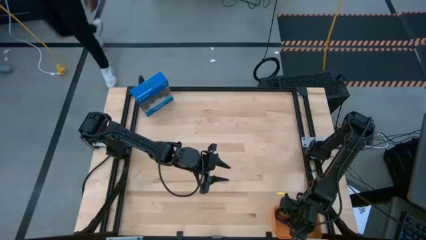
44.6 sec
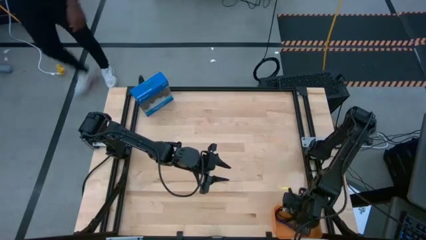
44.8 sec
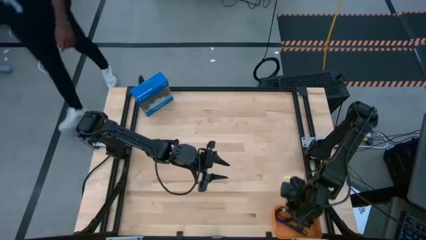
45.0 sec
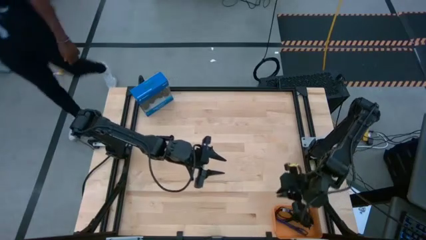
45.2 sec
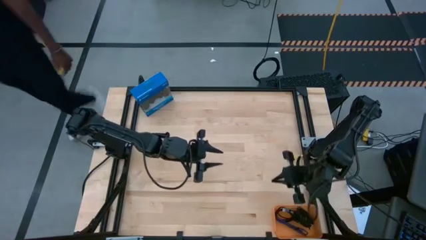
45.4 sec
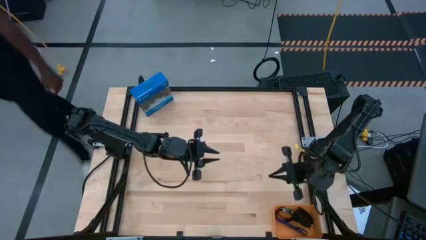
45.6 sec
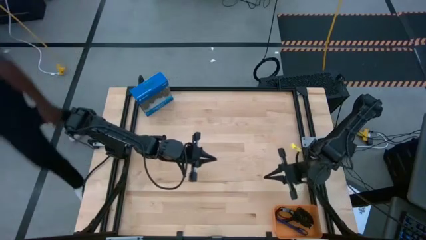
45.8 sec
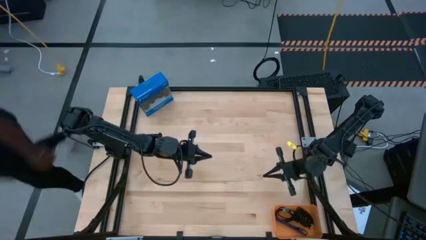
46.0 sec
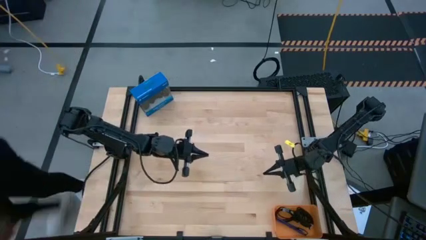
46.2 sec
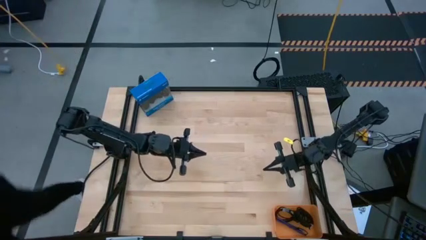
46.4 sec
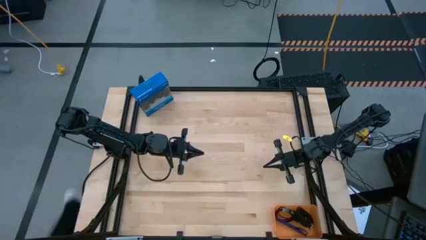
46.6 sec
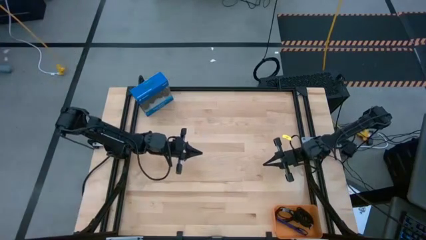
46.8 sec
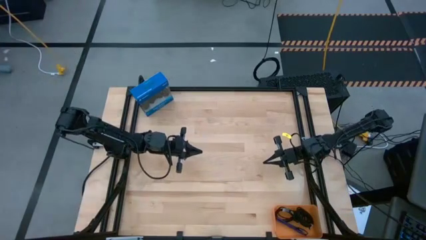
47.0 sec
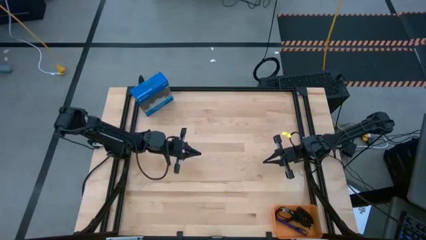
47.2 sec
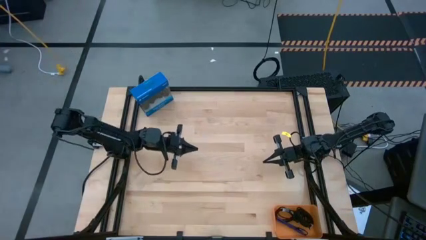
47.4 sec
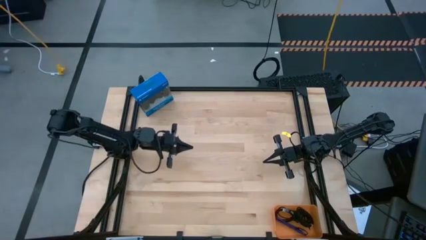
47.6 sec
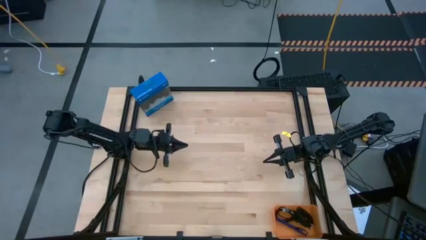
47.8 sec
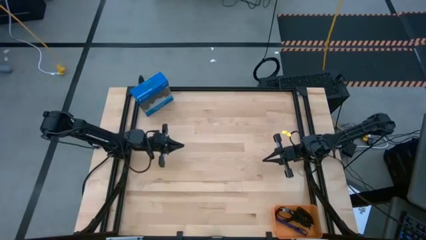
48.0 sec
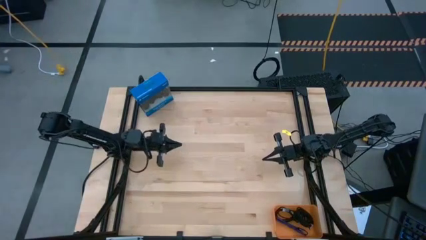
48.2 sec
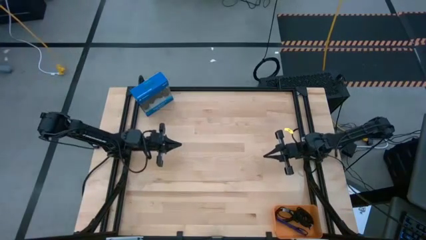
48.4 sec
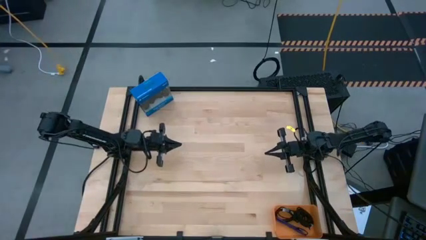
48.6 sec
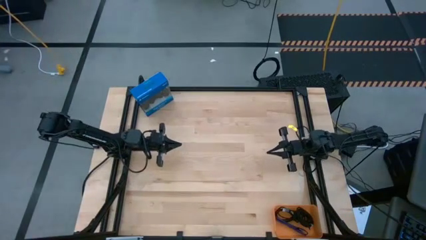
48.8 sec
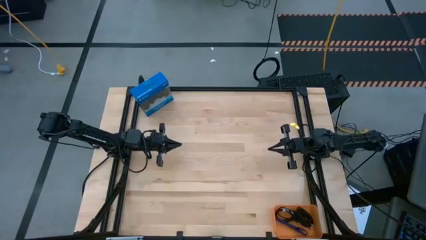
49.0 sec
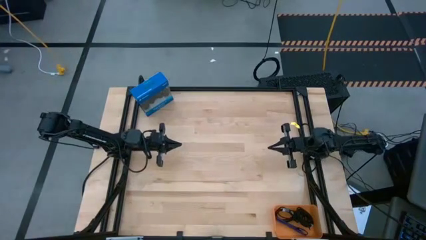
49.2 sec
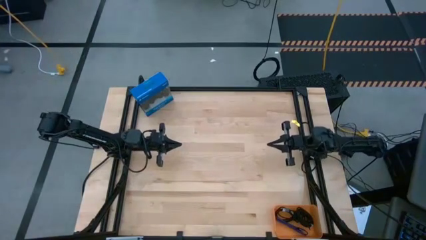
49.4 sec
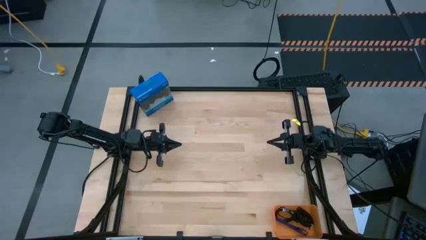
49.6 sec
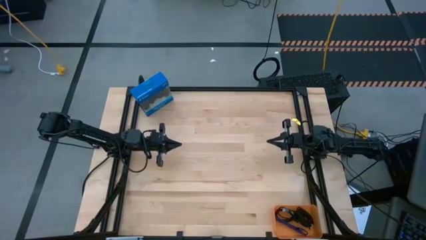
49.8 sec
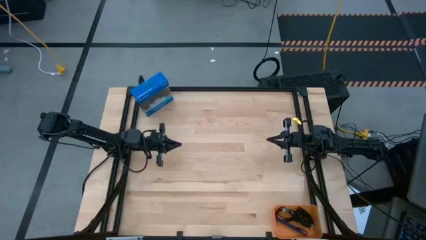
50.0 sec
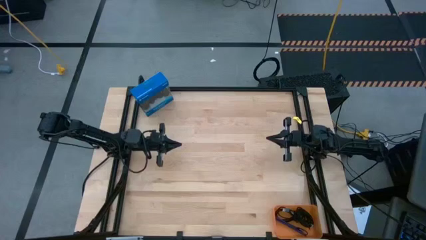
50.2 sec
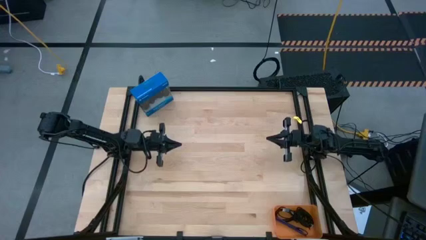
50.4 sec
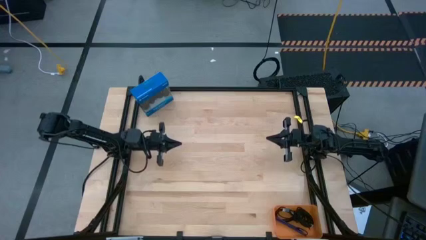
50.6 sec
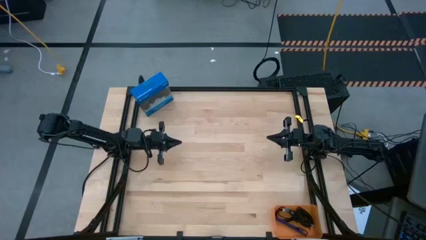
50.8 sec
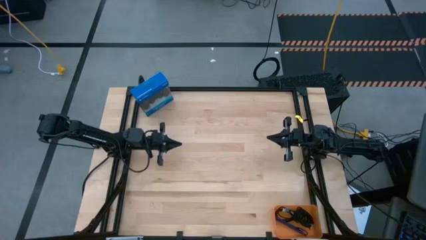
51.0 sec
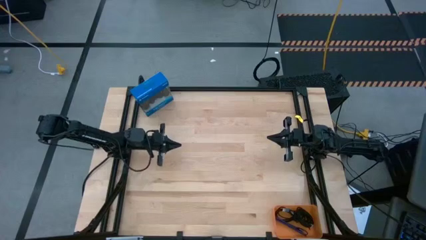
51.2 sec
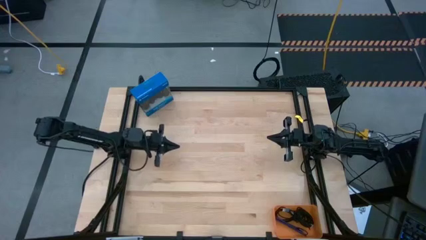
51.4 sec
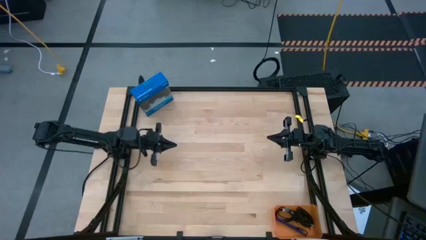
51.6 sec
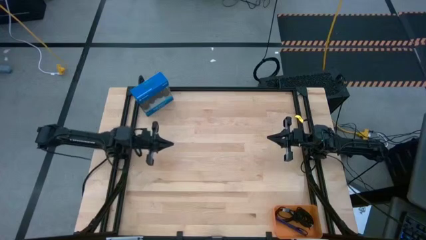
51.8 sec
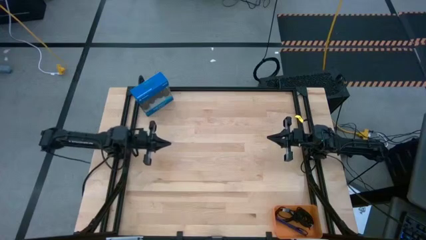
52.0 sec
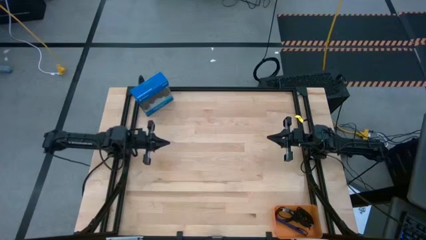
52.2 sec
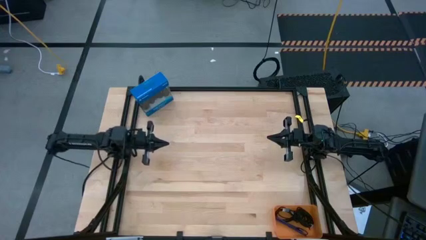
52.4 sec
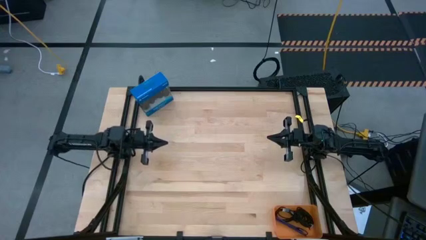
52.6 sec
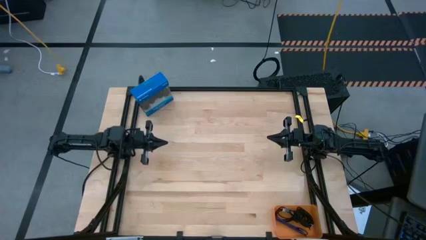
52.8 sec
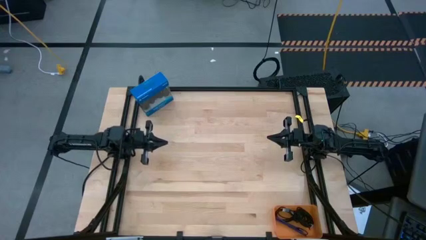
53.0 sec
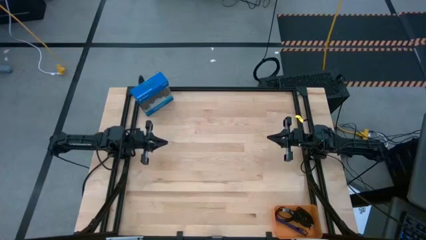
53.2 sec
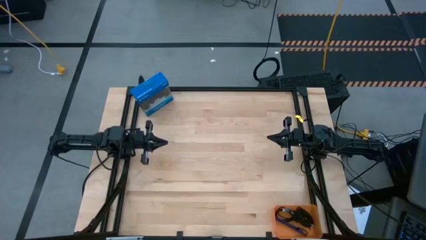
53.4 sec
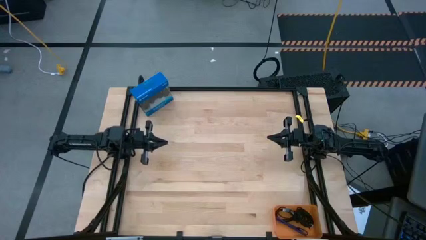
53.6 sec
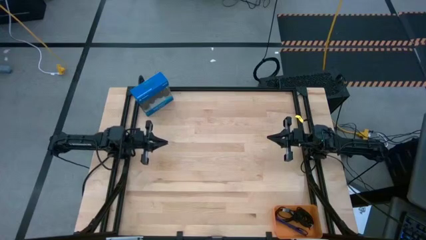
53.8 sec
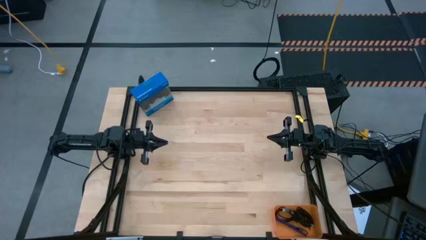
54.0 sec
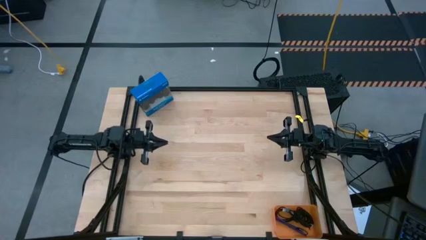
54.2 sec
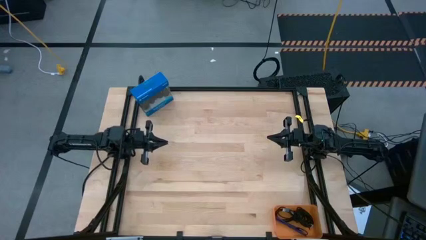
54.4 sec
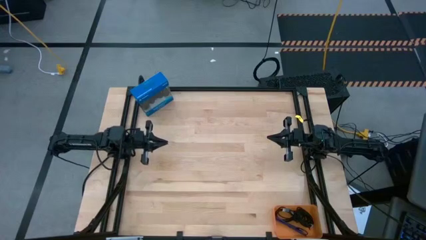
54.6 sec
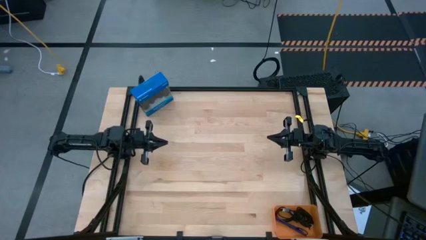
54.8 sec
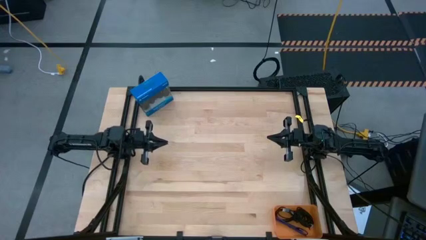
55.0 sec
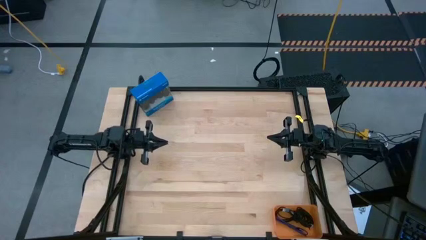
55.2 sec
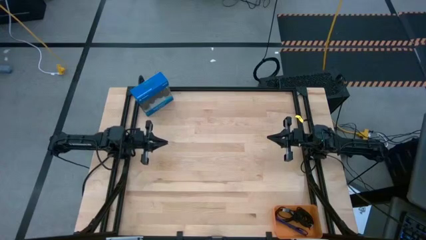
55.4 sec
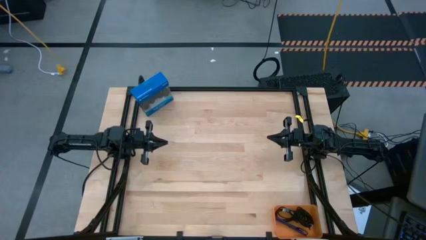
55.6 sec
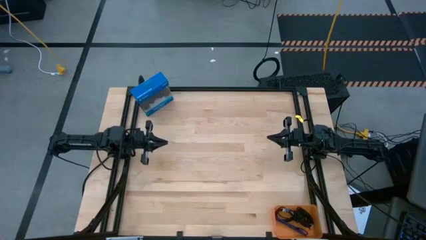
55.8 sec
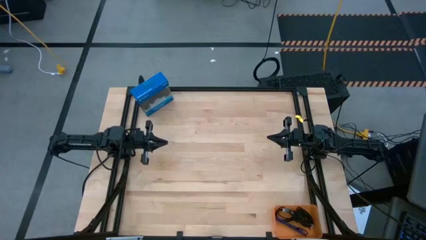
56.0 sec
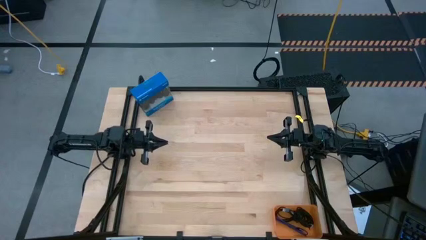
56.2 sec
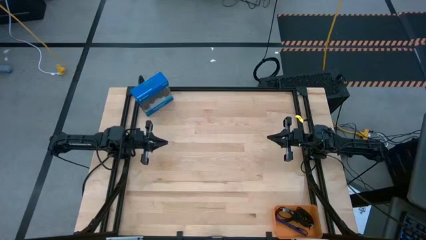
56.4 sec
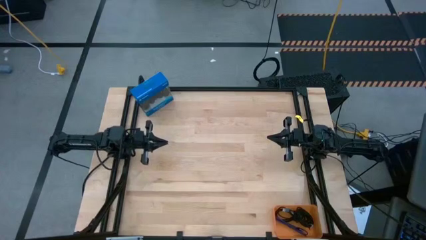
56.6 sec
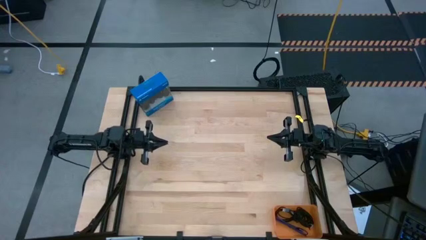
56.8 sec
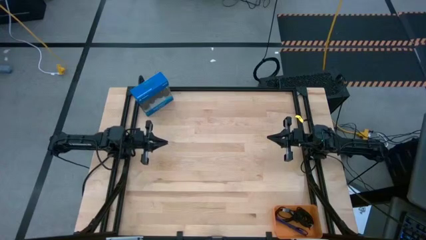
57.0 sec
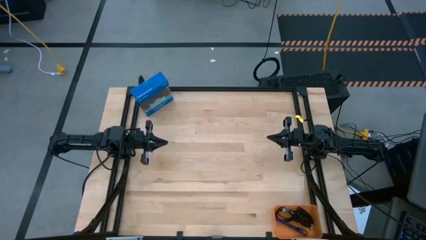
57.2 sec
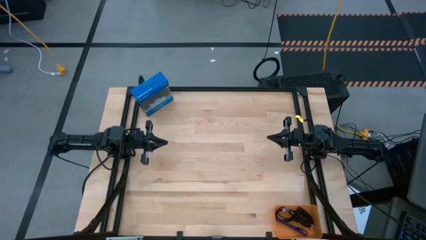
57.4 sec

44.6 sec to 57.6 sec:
Task: Pick and place USB-C Cables
Return to Home Position

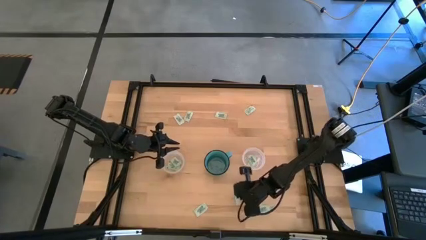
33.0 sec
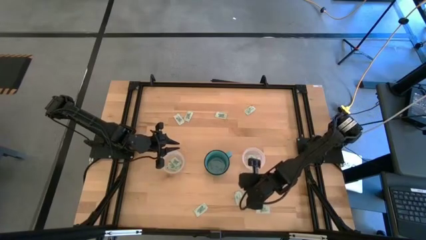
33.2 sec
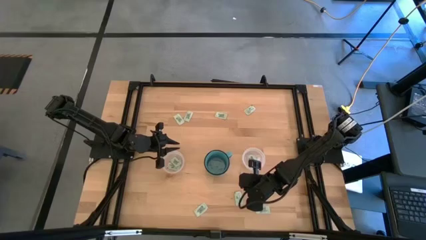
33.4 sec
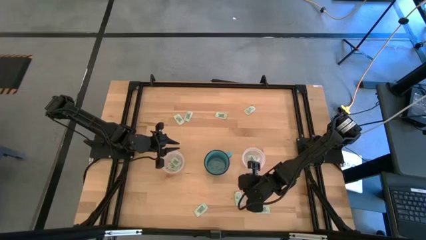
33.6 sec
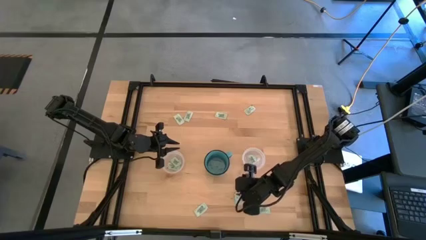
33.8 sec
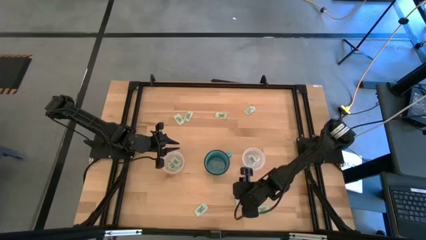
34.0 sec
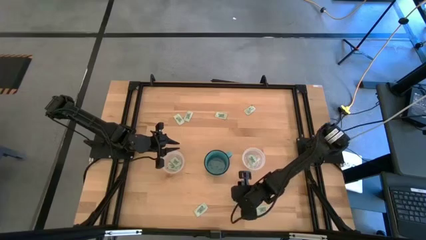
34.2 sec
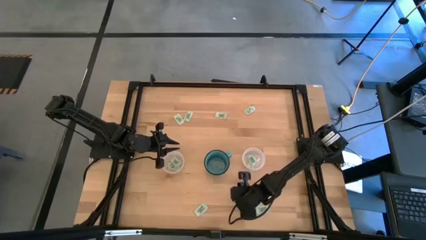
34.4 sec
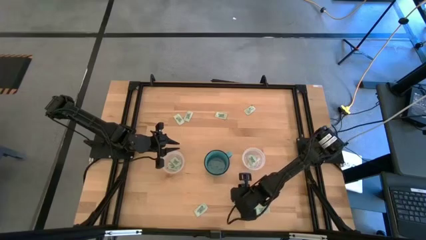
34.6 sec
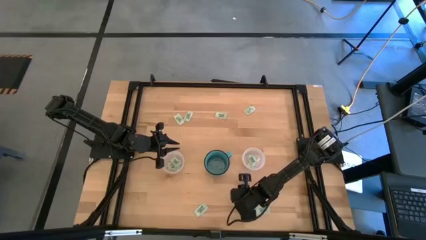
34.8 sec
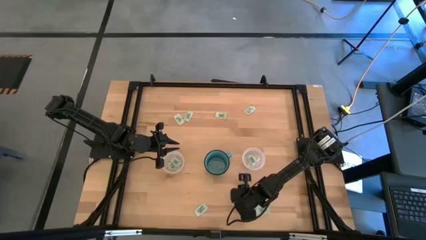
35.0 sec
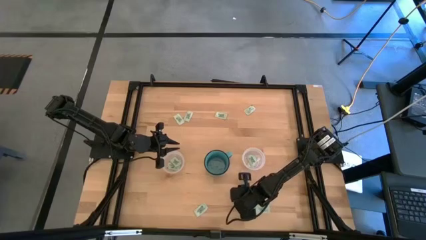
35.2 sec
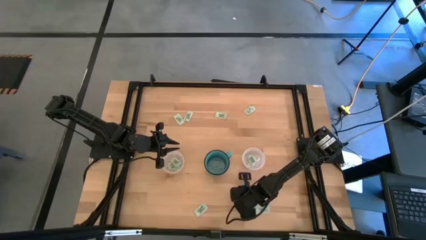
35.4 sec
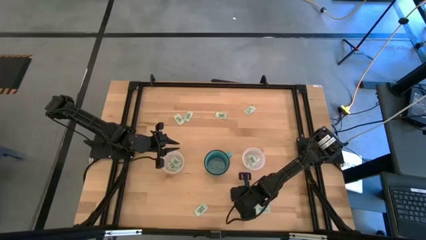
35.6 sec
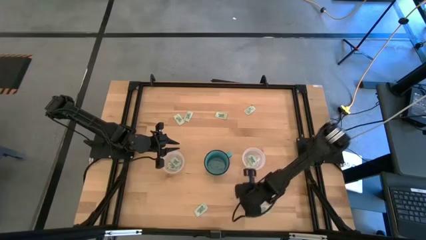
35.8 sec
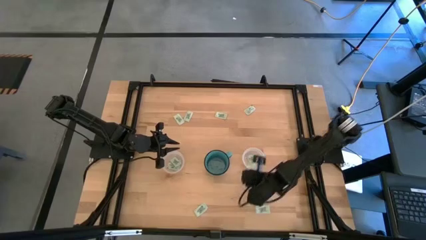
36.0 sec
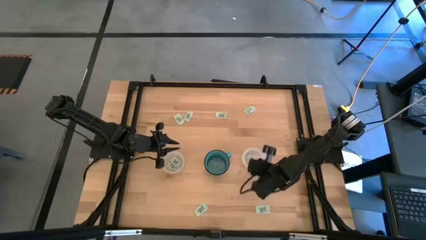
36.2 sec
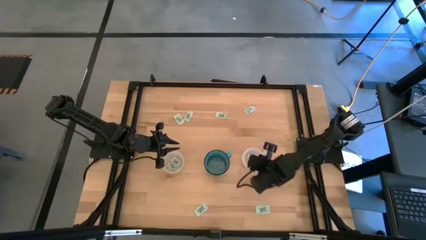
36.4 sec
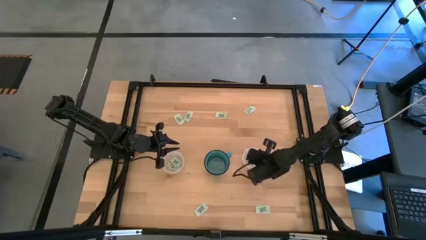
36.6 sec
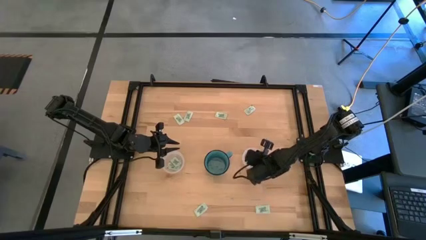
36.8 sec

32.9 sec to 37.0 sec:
Task: Pick and place Stevia / Truvia into bins
Put the green stevia packet into the right transparent container
